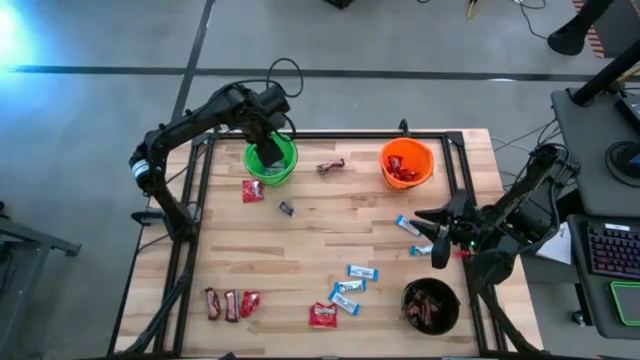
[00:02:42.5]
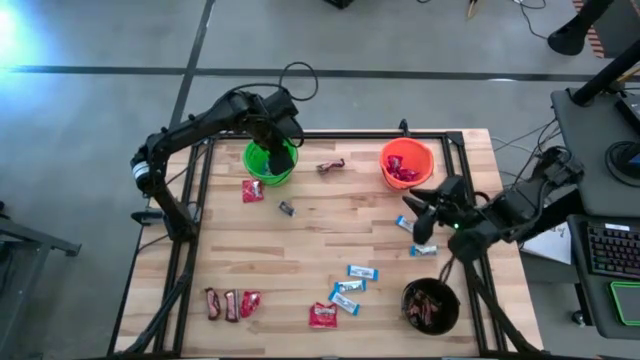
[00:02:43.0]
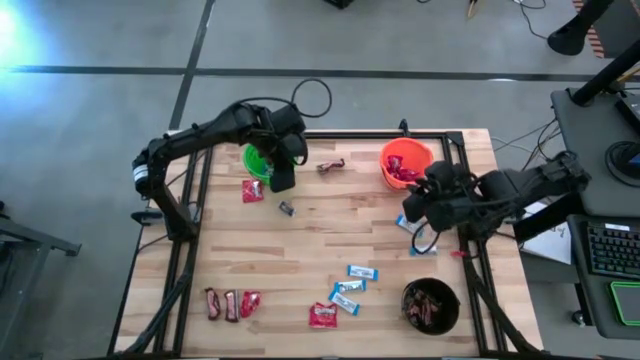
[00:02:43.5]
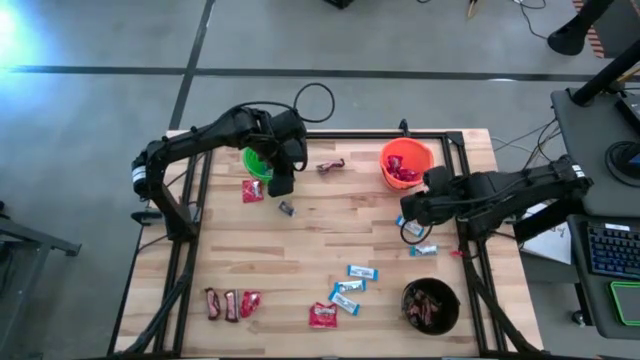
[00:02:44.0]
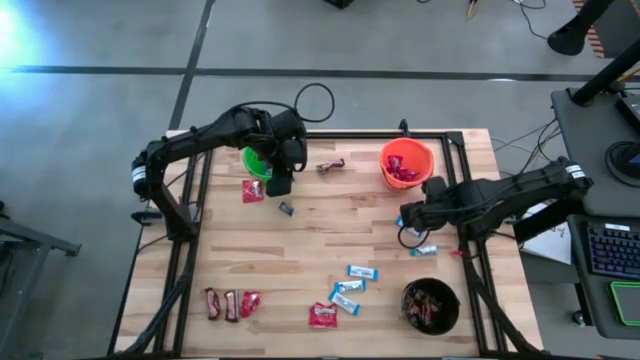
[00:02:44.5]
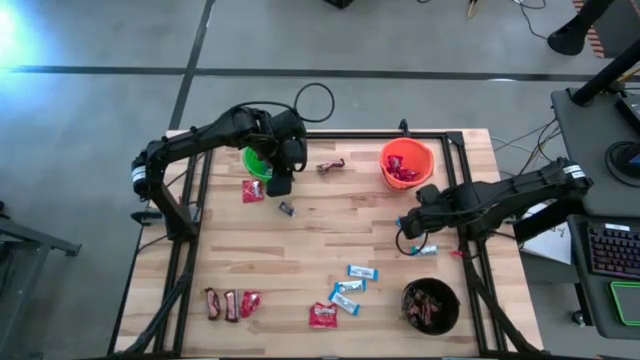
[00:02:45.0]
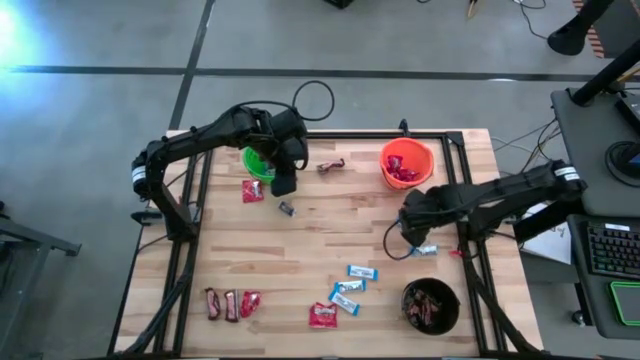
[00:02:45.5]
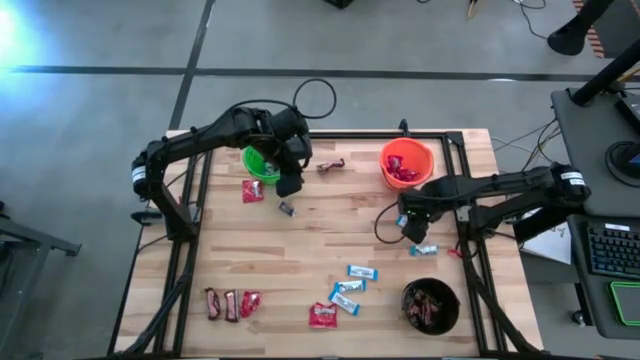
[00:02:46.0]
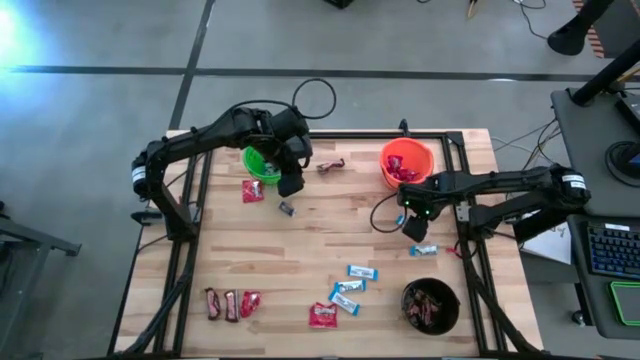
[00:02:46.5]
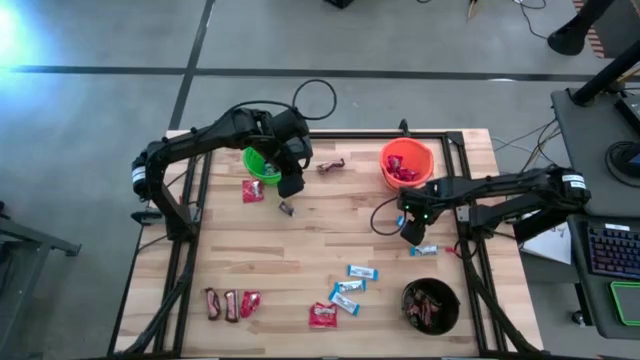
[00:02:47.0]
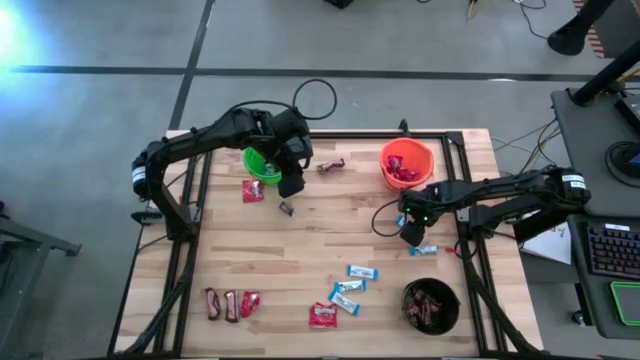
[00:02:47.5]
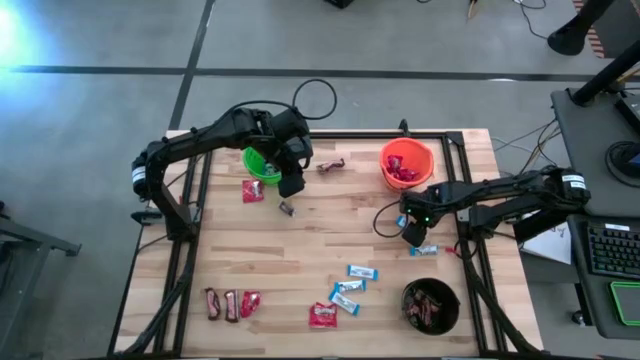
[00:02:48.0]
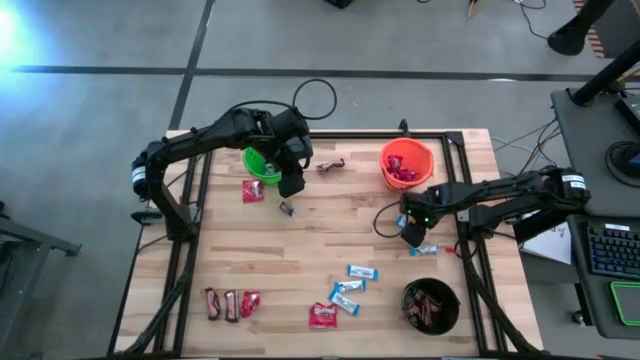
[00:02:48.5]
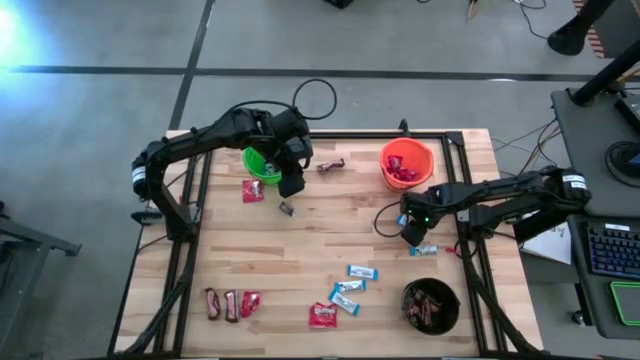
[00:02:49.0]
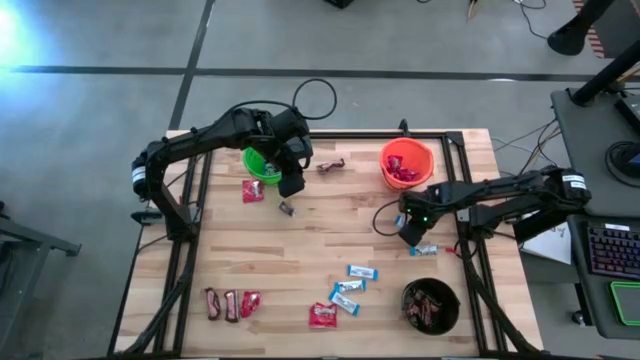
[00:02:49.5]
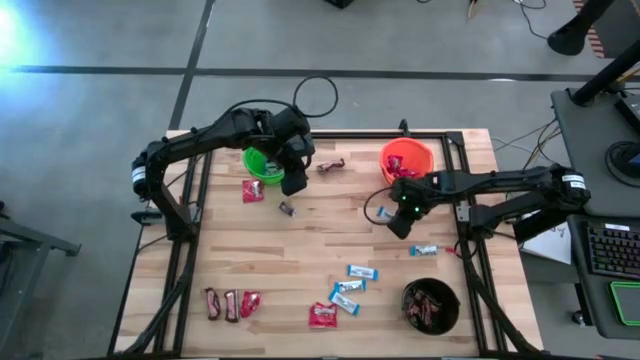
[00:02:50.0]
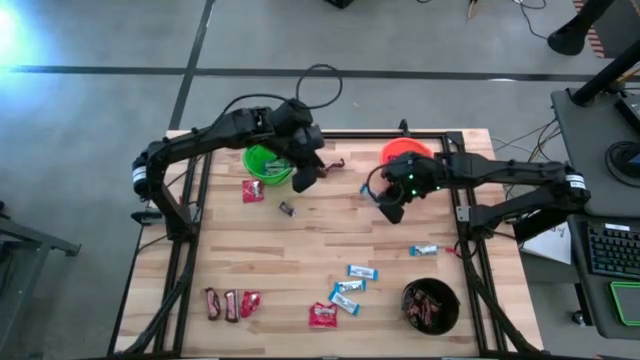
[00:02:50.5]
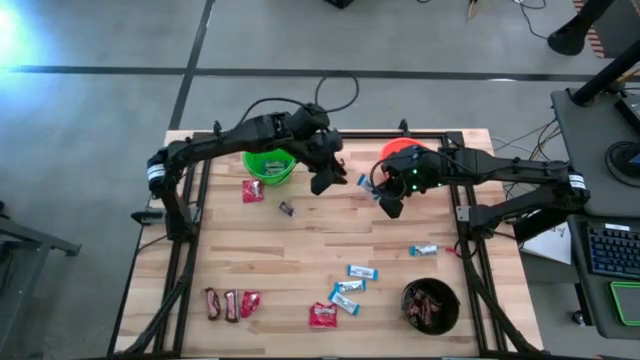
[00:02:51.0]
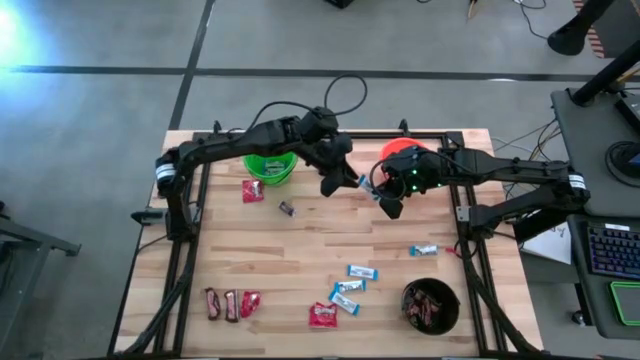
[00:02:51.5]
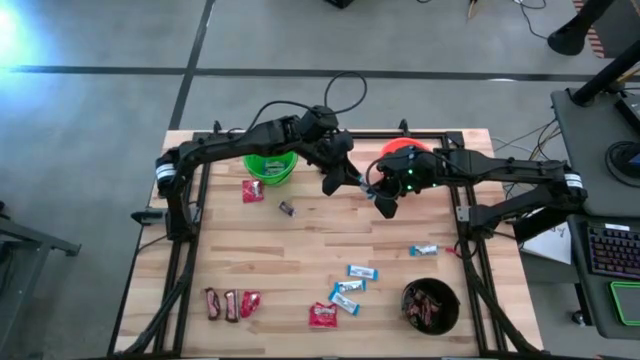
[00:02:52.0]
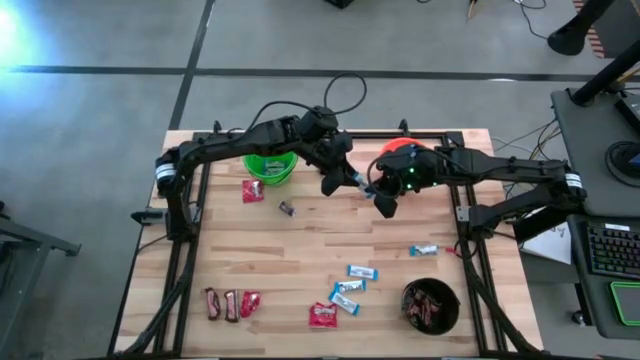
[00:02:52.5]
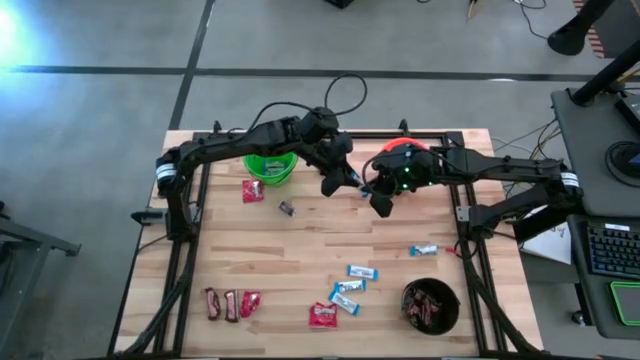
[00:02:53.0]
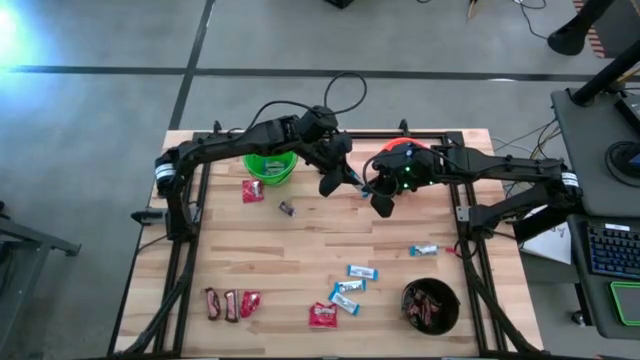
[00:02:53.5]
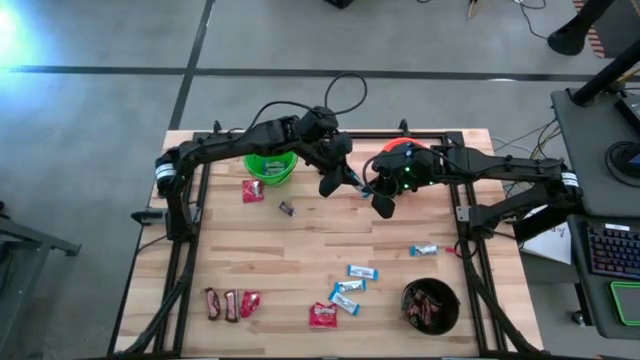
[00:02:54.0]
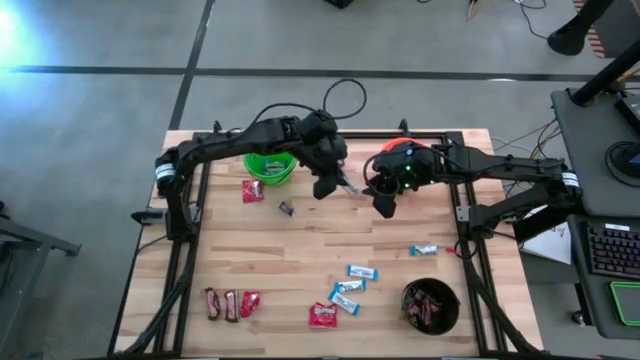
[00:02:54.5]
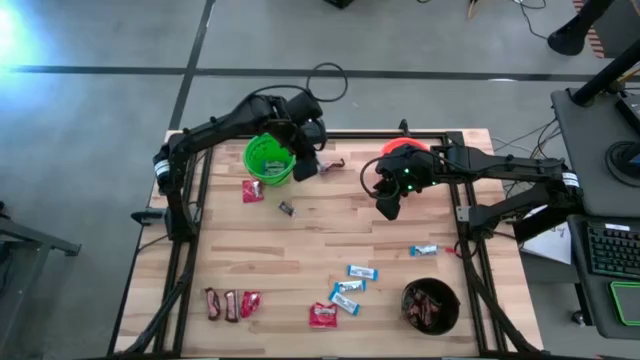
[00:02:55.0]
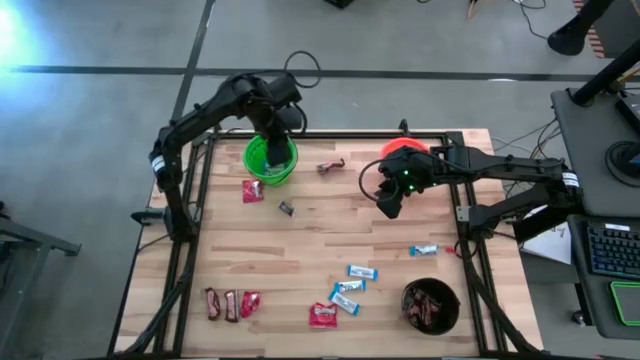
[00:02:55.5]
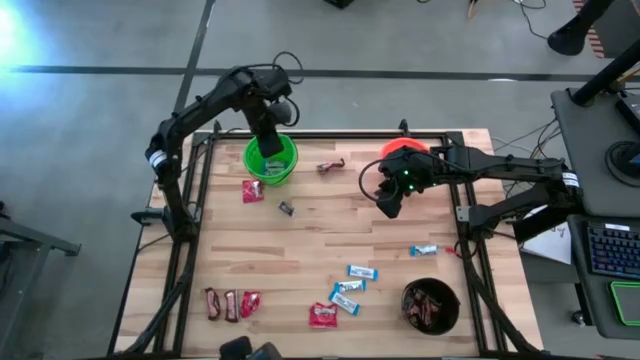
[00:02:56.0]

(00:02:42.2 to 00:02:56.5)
Task: Sort candy
Put the white candy into the green bucket

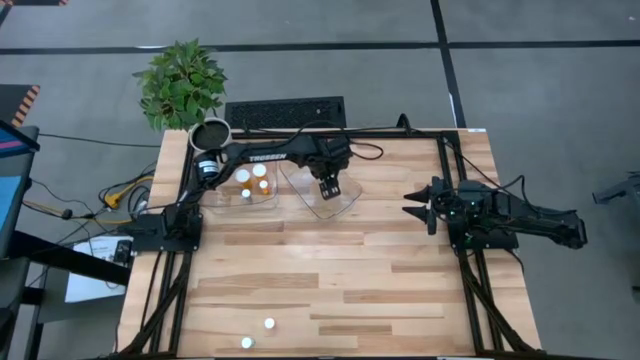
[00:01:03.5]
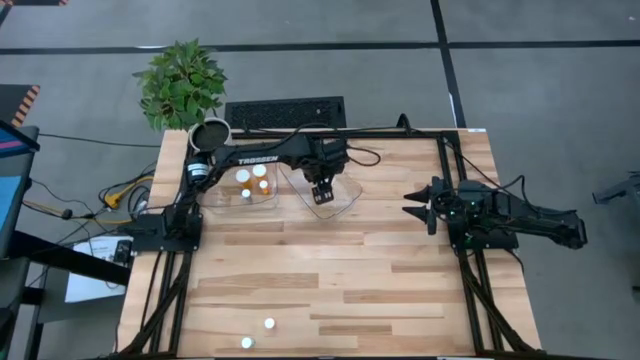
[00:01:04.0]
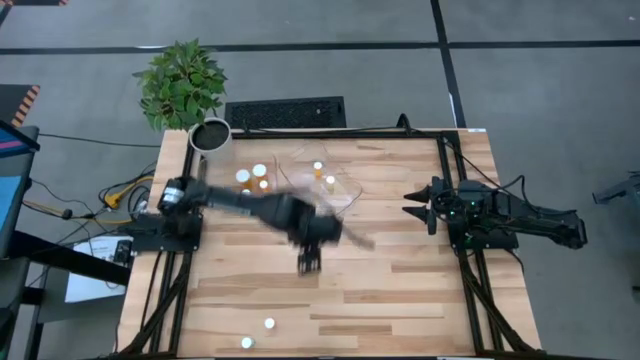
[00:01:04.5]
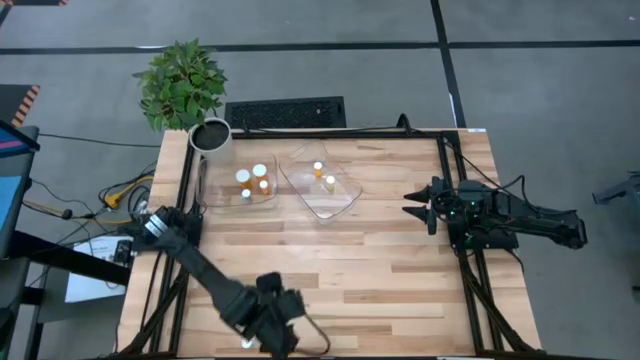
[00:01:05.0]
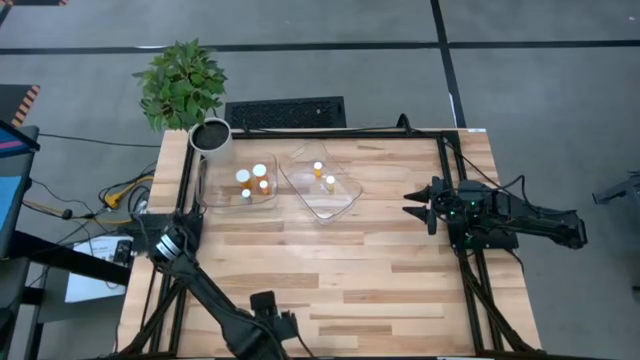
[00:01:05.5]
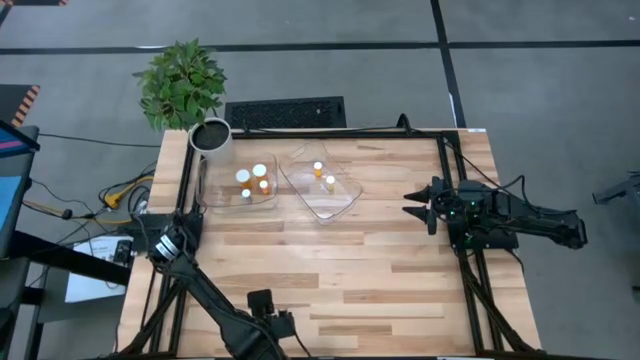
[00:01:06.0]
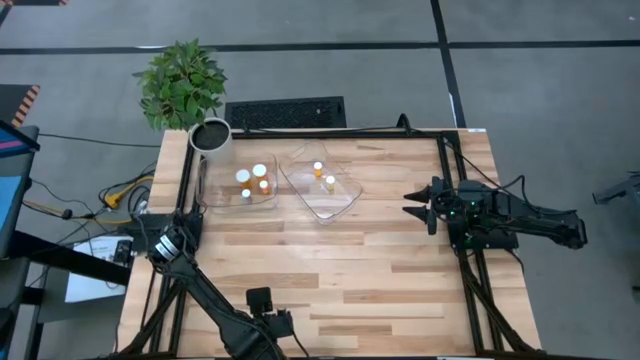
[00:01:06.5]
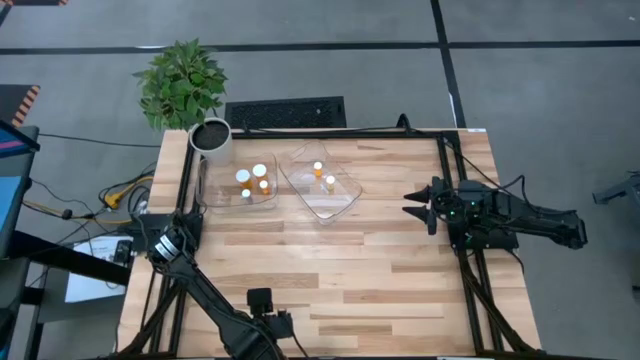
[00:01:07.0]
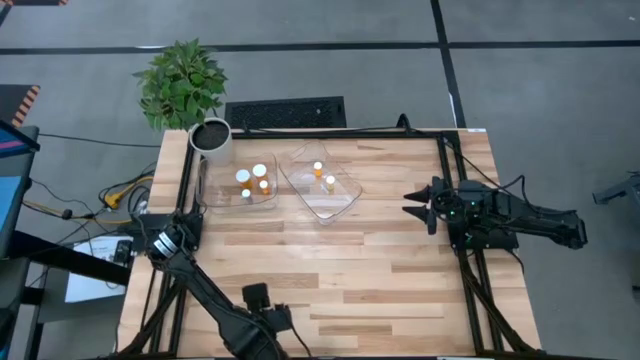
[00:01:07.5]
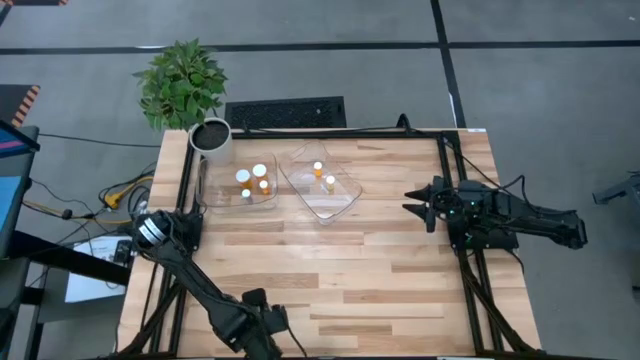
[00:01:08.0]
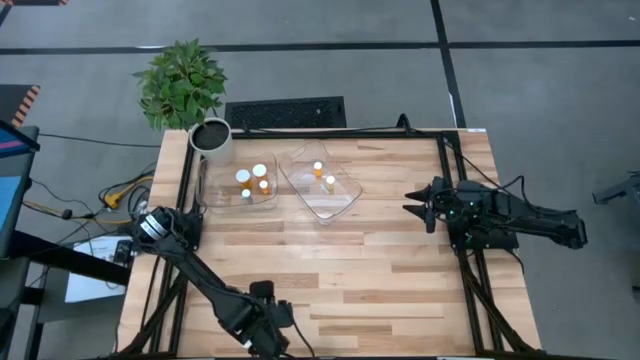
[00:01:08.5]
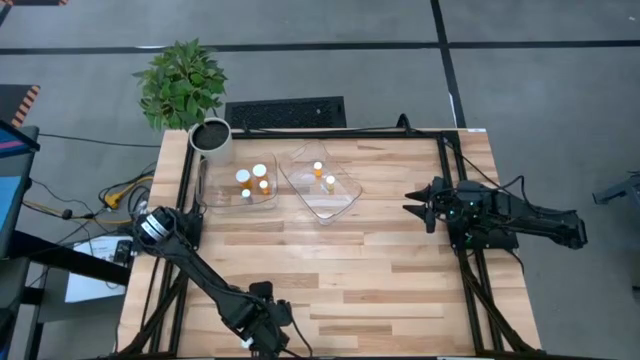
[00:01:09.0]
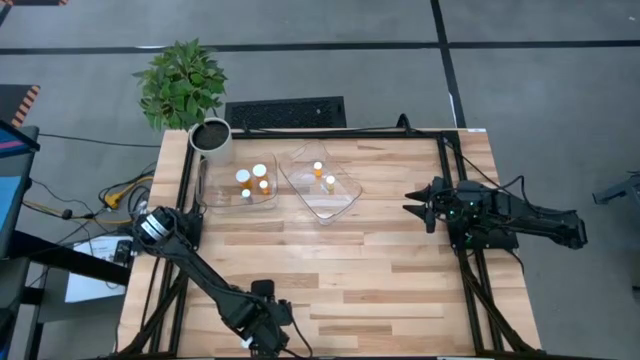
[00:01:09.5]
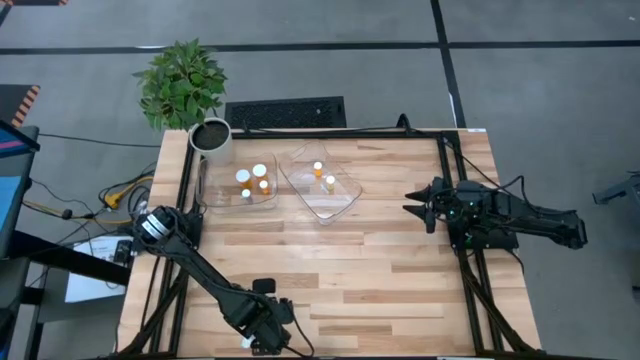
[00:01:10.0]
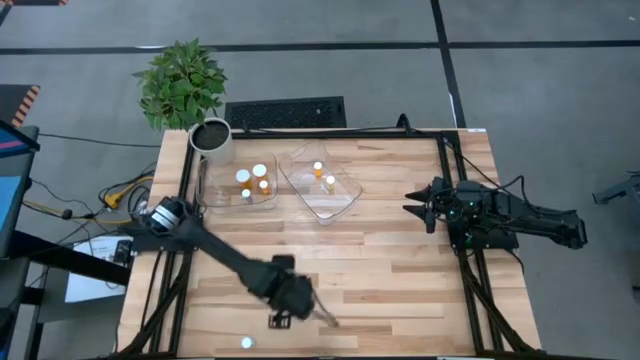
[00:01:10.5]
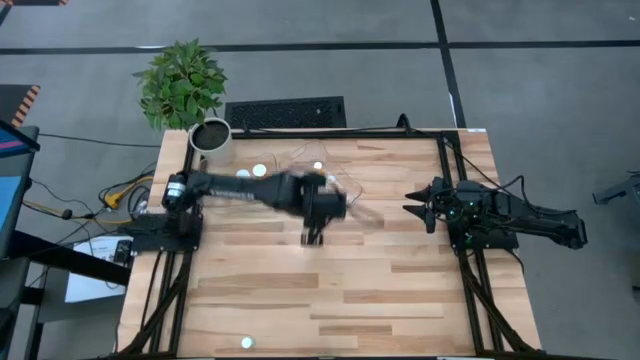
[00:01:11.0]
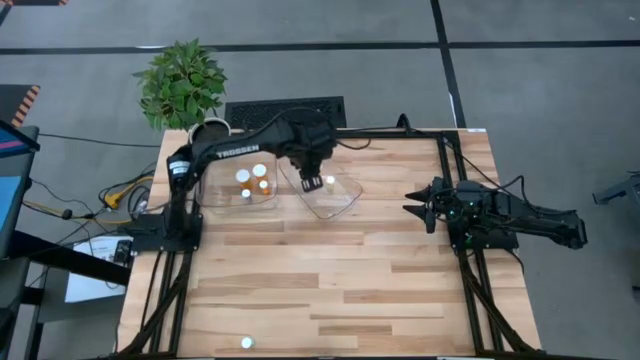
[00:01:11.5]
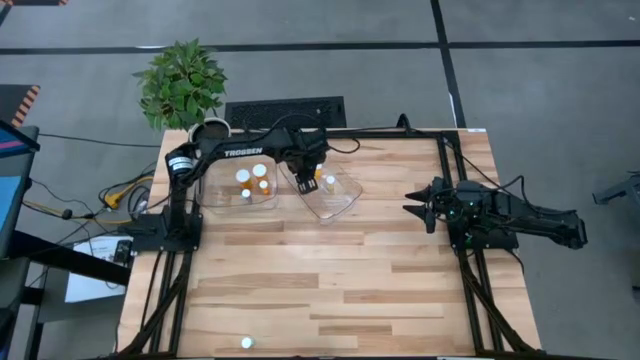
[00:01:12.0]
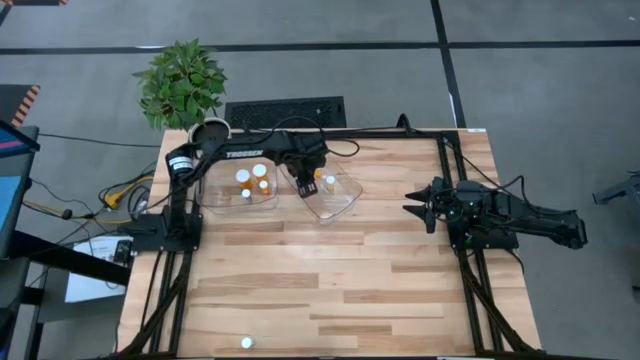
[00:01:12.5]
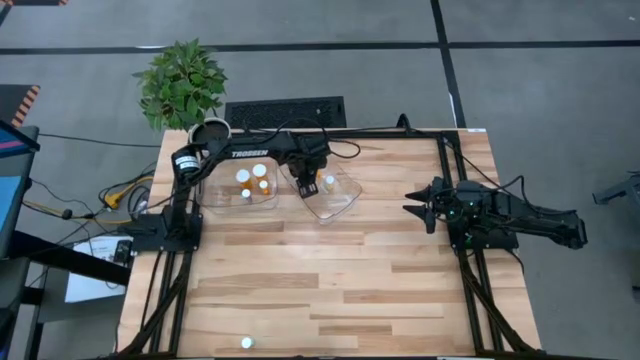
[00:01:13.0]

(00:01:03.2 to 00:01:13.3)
Task: Pick and place medicine bottles into bin by pill shape (circle, oval)
Put the small red tablet bottle into the right transparent bin
